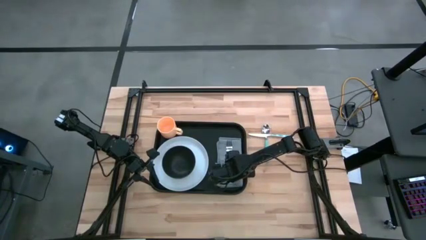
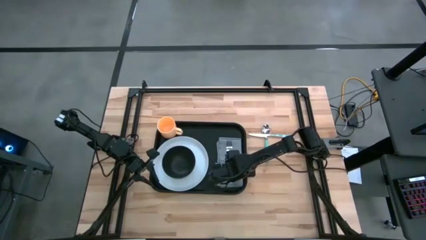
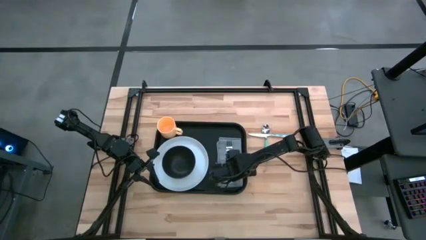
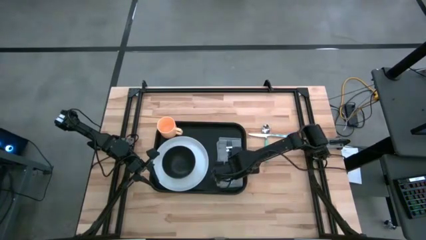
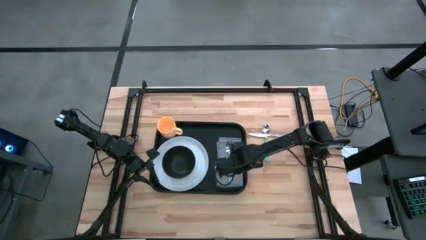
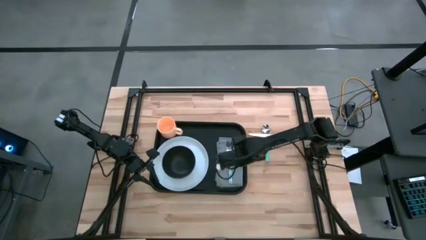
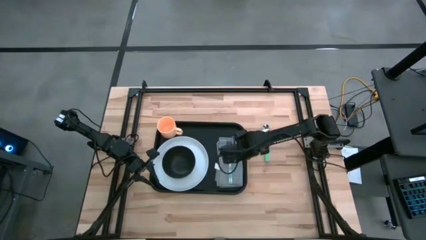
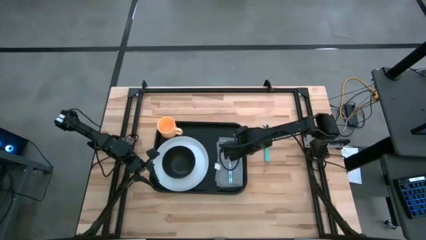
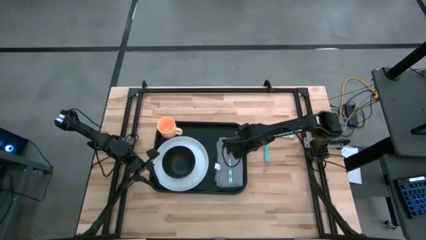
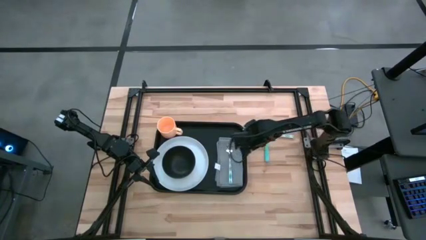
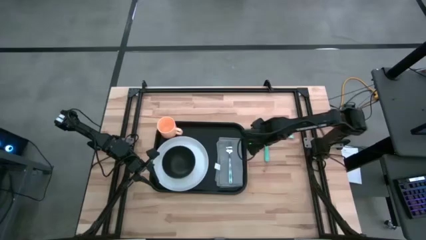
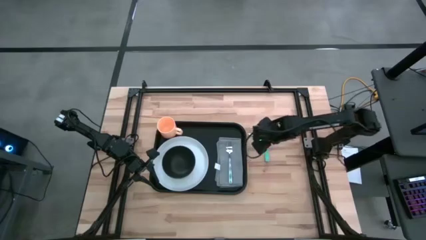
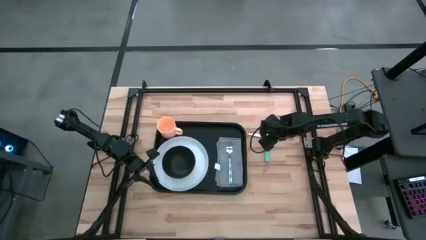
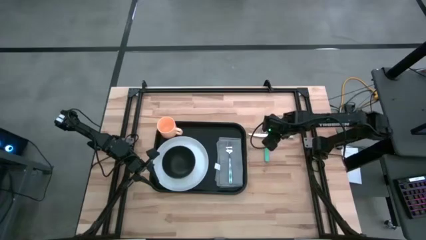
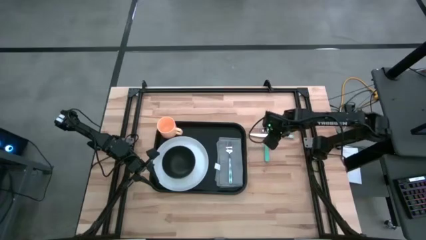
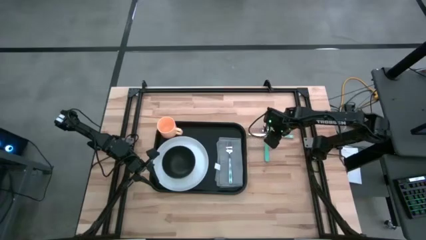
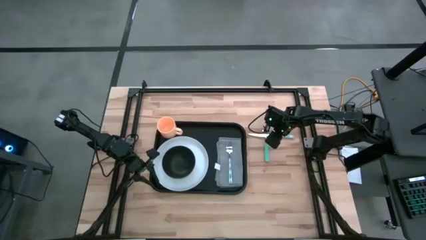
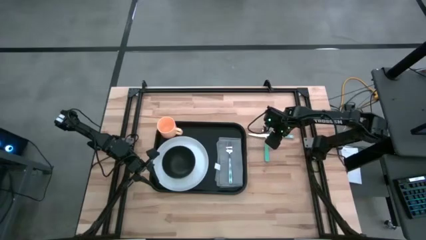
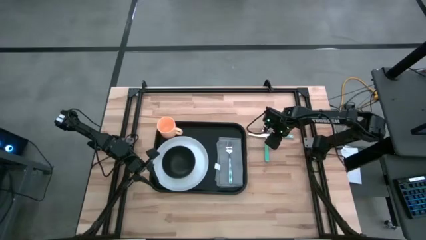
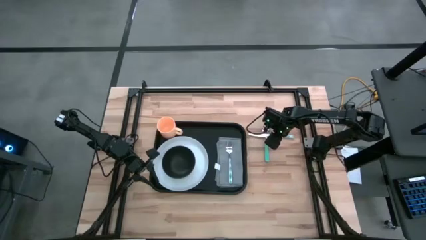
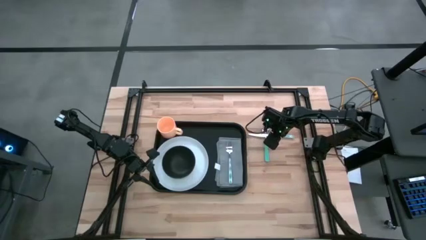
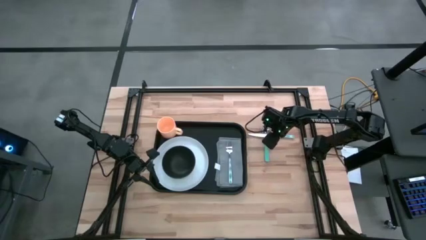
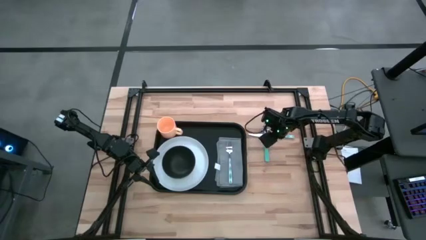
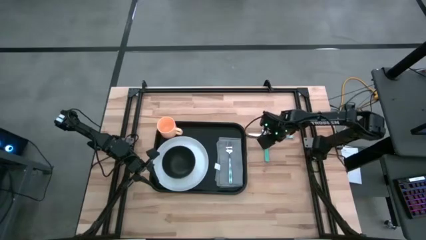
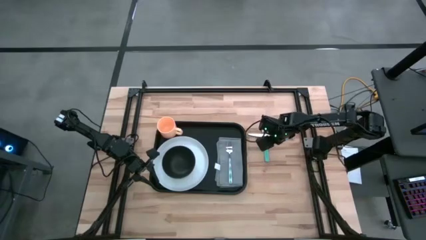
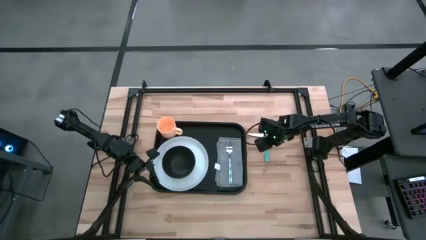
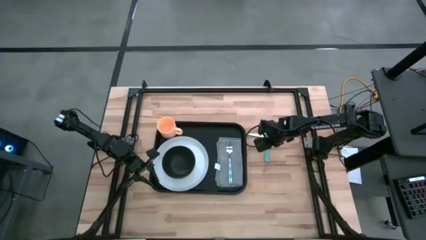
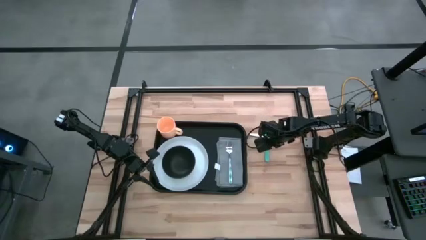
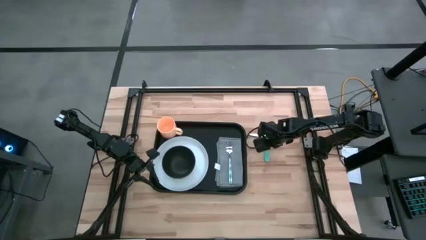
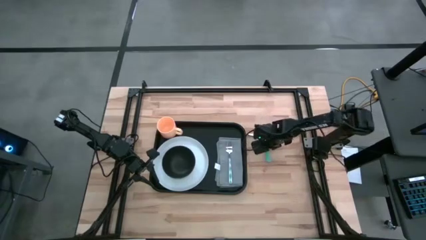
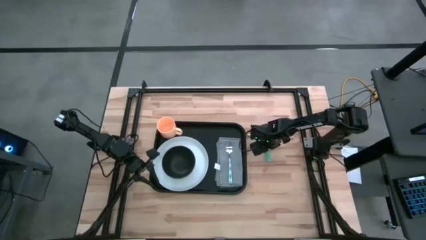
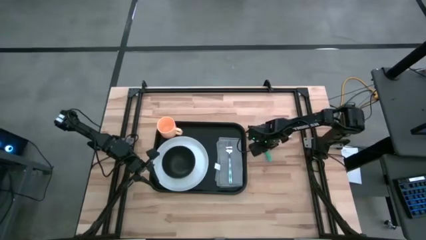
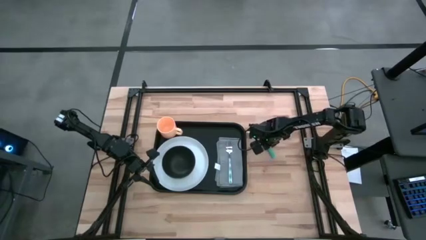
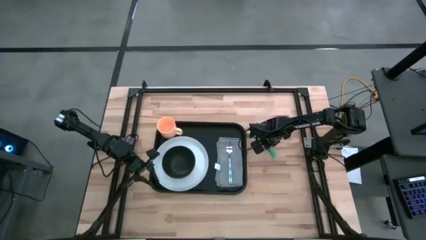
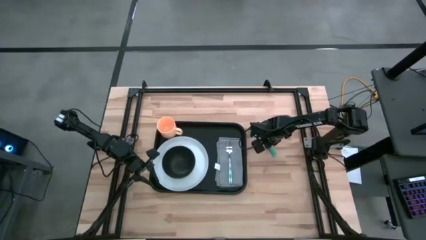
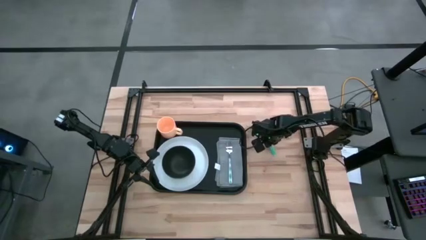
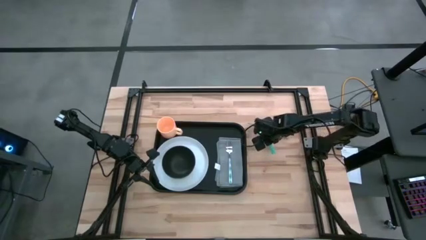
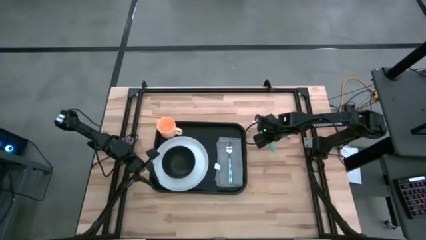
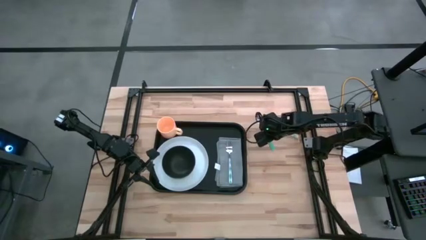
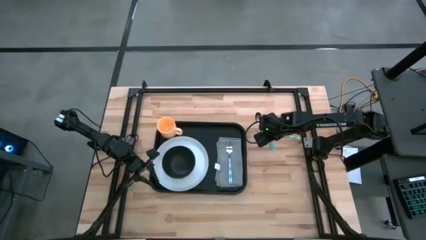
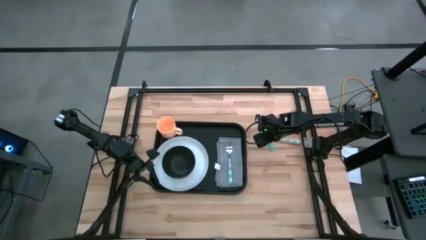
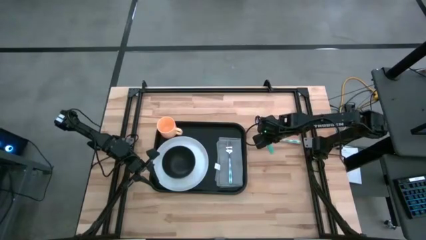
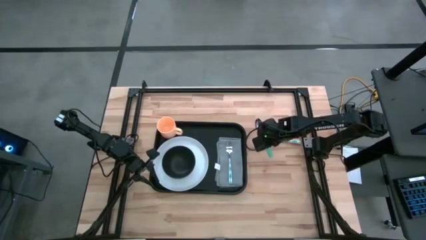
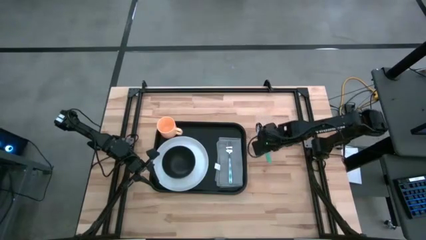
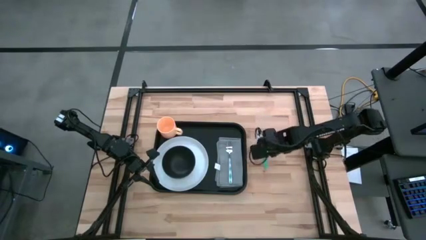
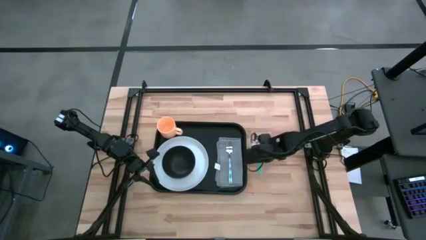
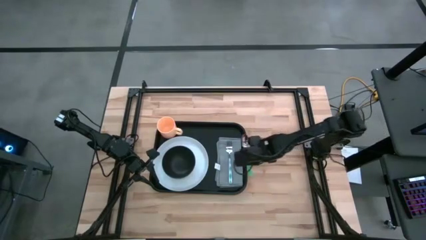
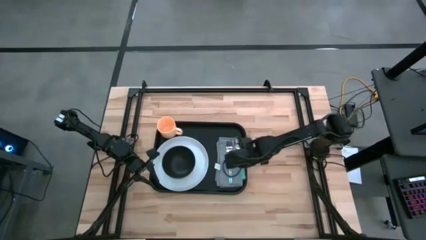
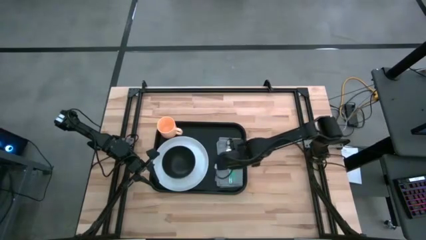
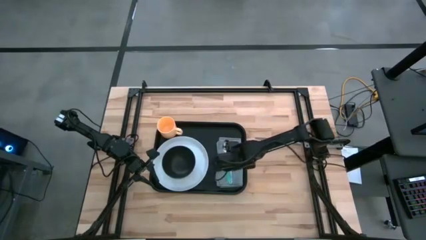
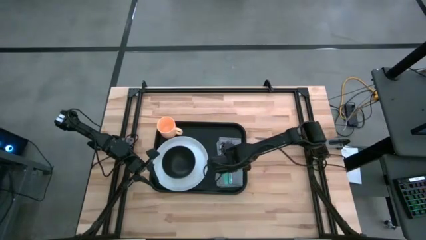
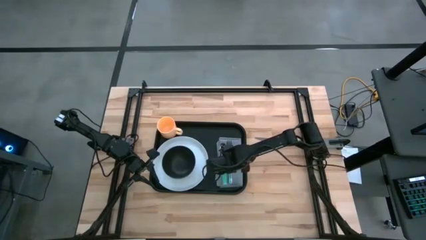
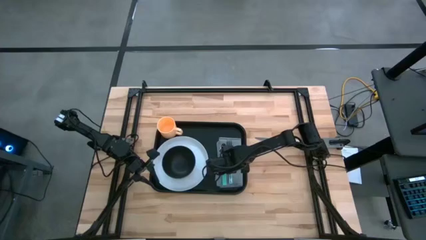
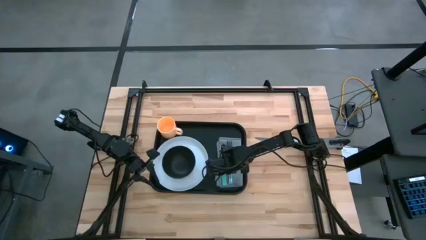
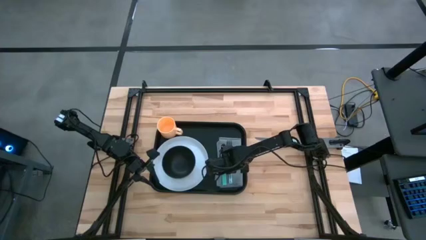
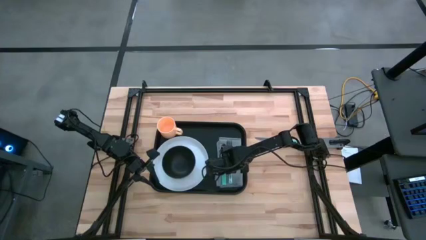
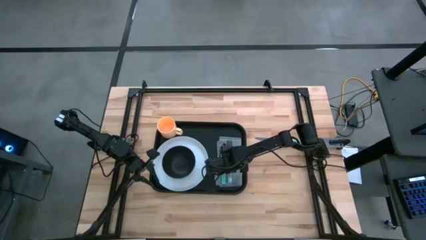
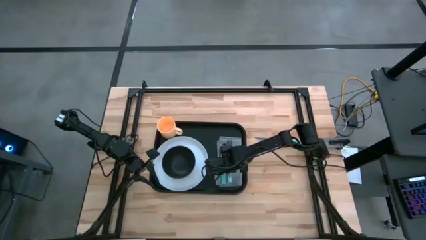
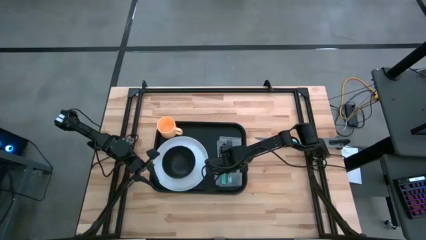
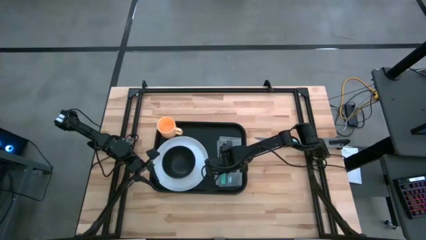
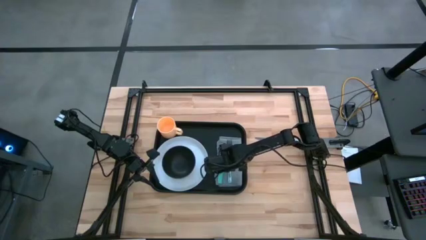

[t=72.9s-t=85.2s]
Task: Set up tray
Put the blue spoon on the left side of the blue patterned fork

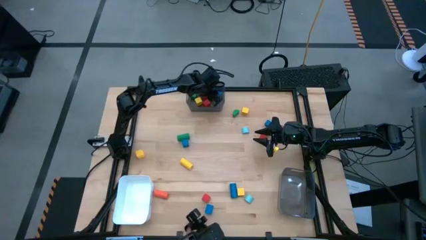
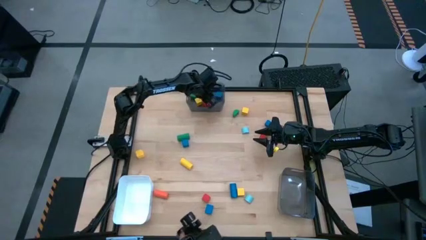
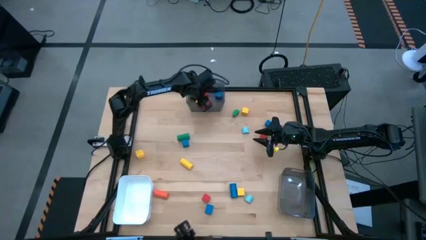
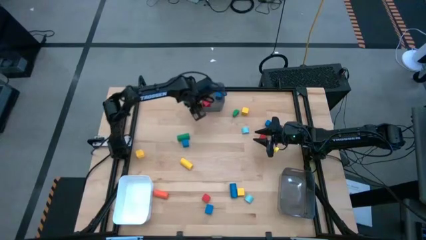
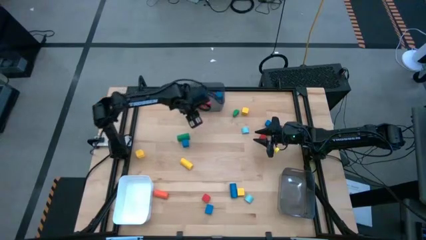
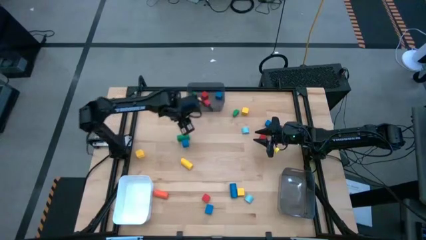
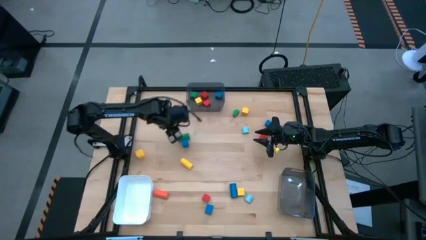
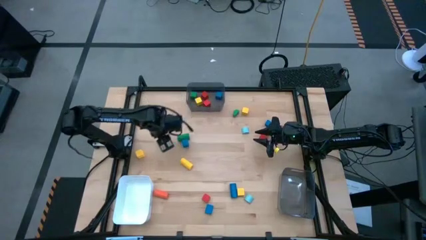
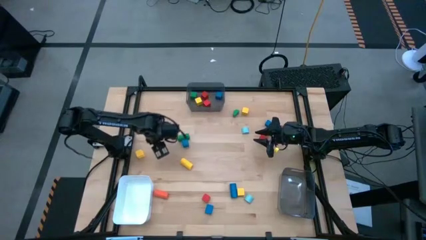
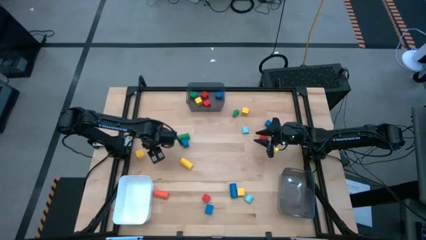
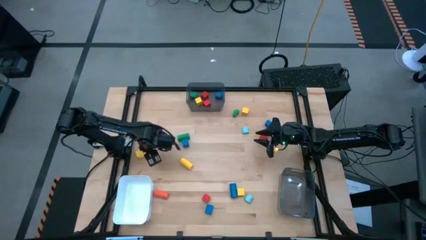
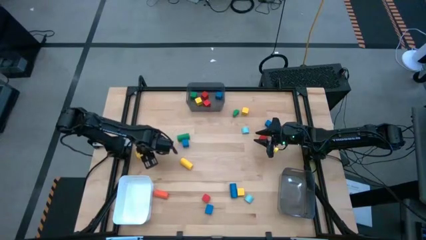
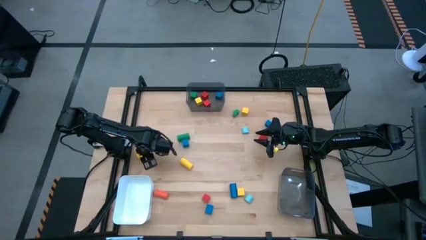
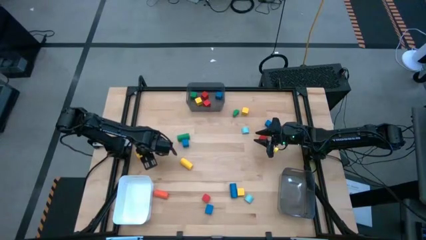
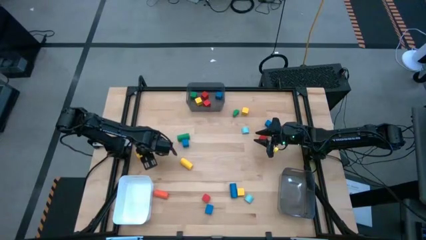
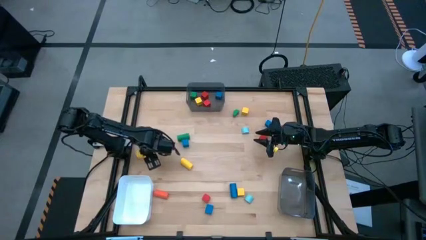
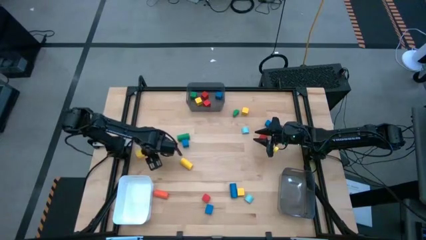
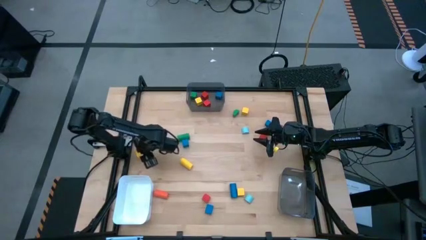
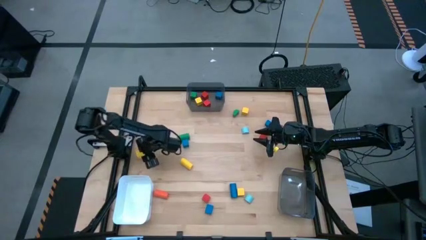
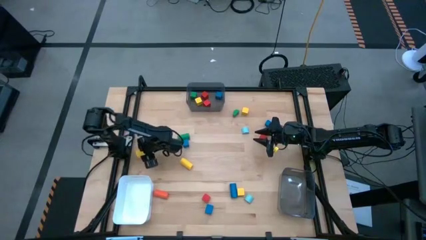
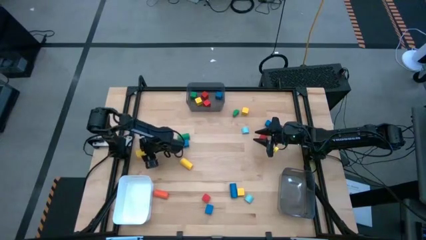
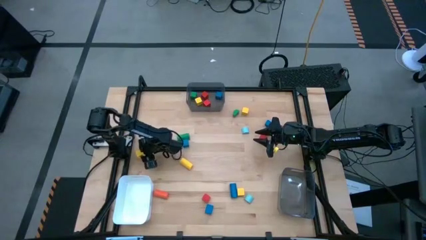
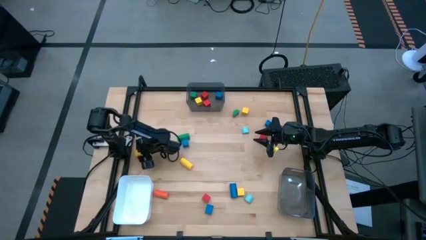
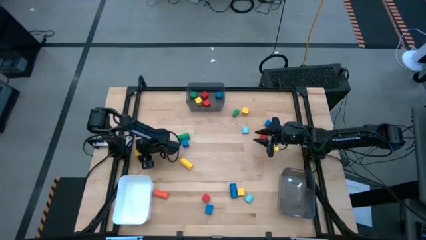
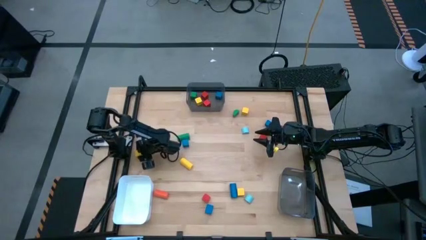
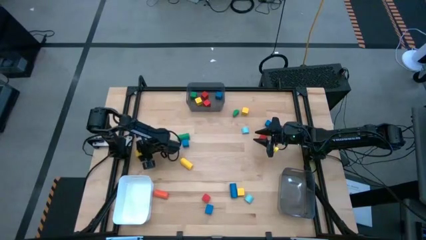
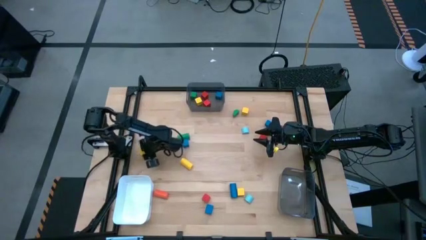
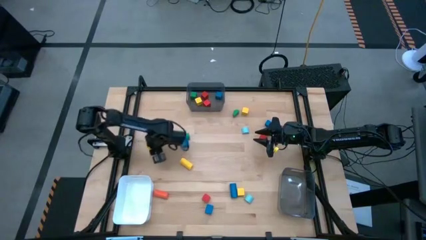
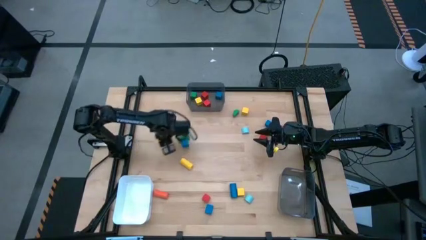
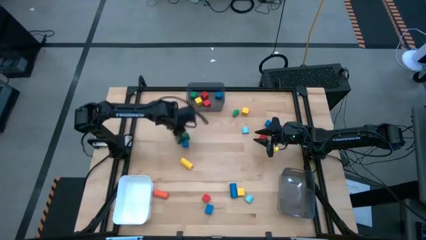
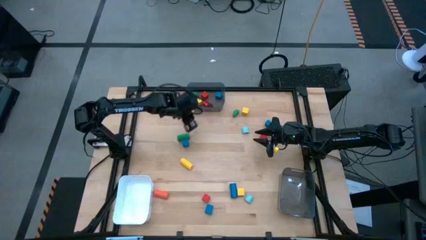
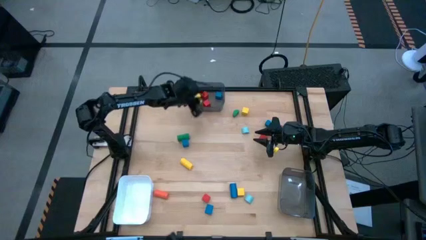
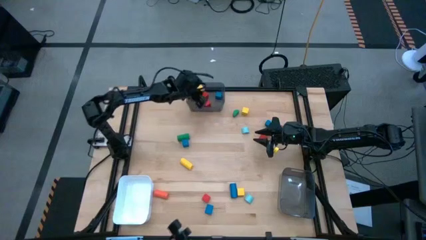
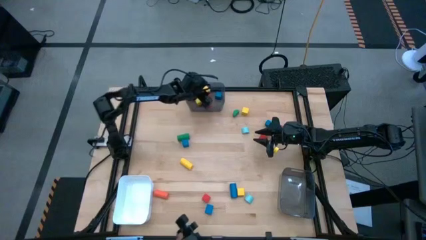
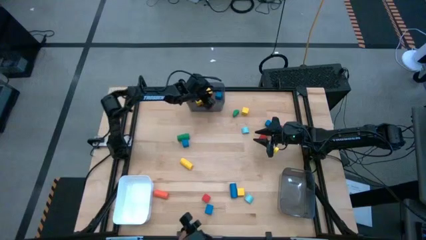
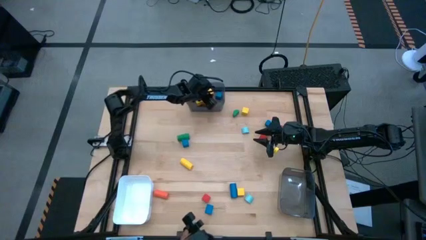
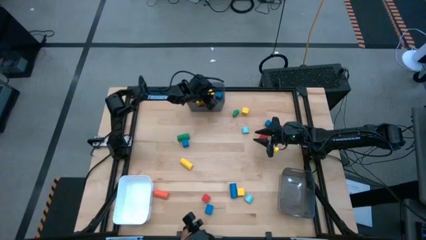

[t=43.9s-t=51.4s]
Task: Sort blocks by size
Put the yellow square block into the top black bin
